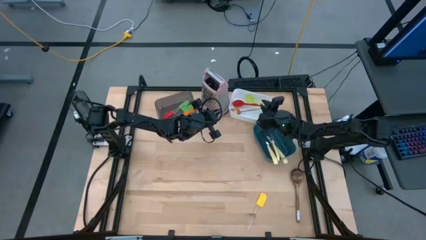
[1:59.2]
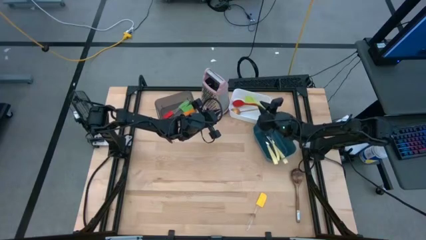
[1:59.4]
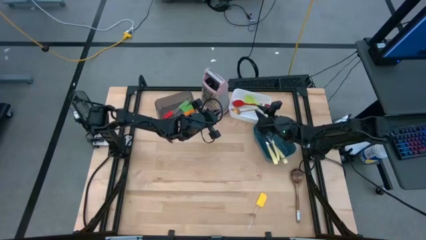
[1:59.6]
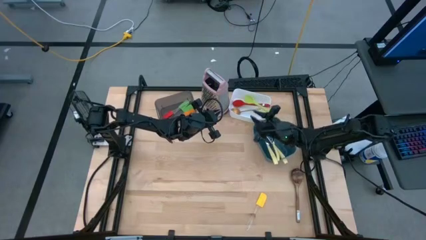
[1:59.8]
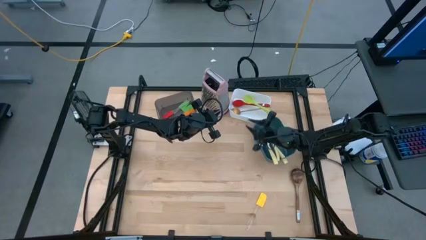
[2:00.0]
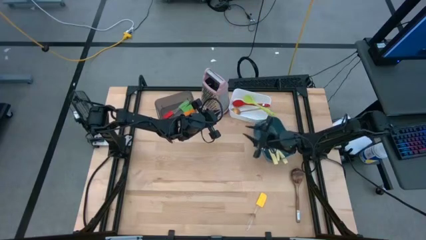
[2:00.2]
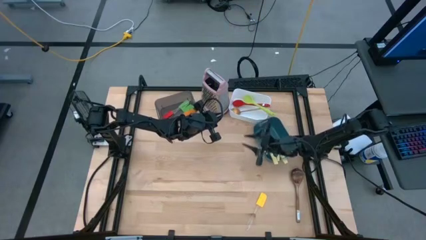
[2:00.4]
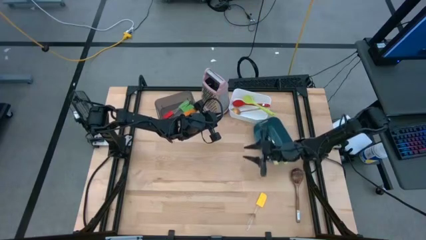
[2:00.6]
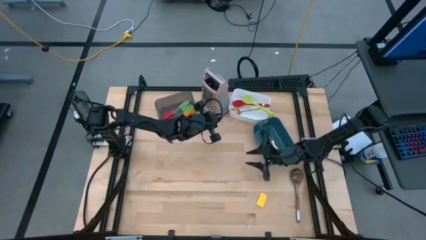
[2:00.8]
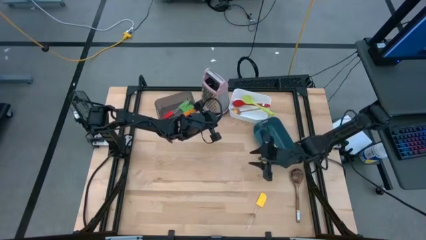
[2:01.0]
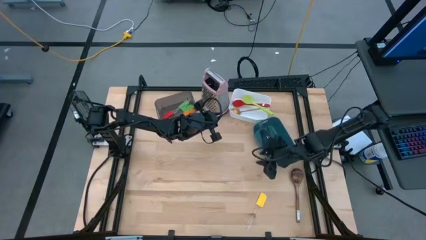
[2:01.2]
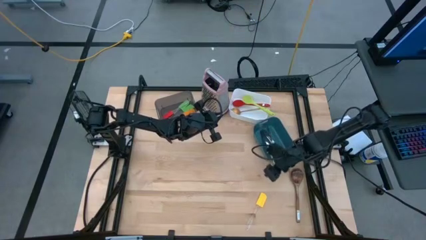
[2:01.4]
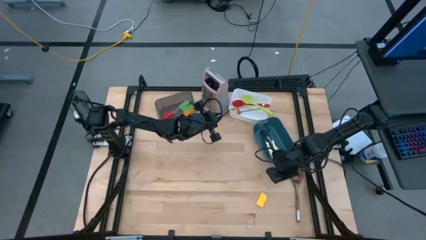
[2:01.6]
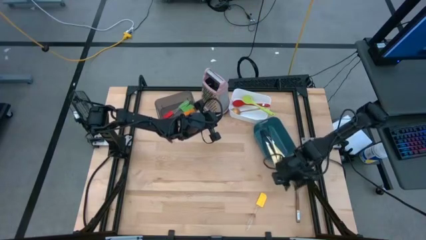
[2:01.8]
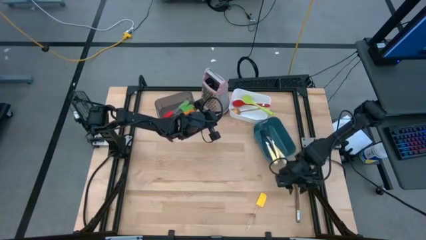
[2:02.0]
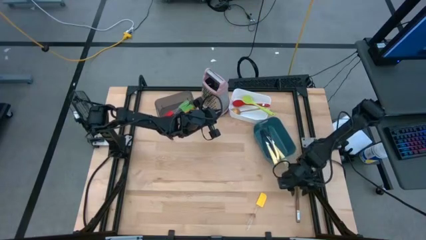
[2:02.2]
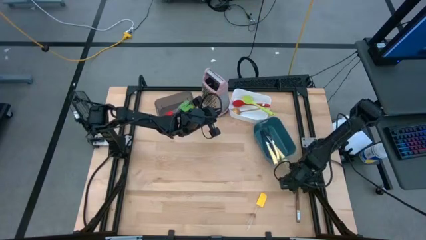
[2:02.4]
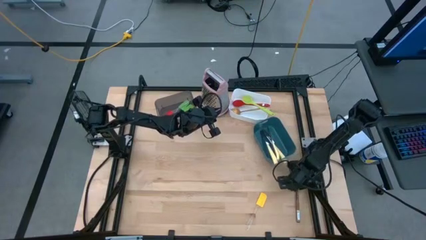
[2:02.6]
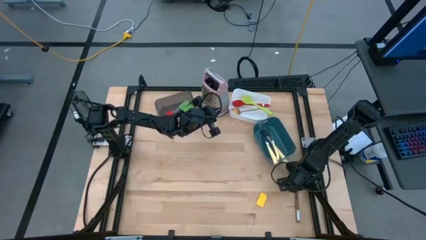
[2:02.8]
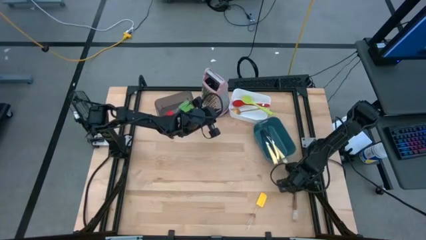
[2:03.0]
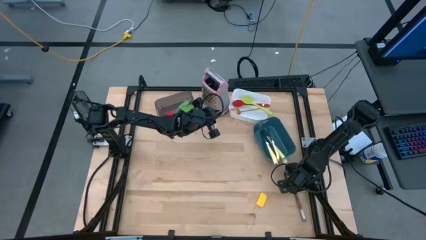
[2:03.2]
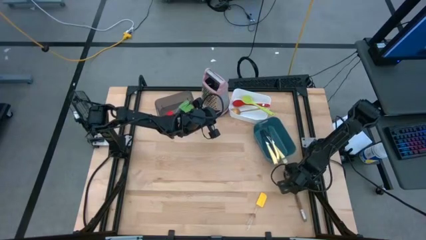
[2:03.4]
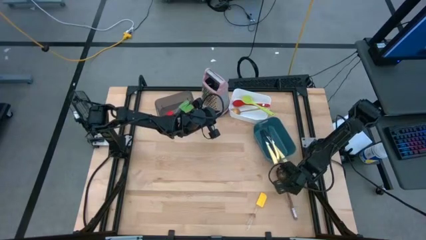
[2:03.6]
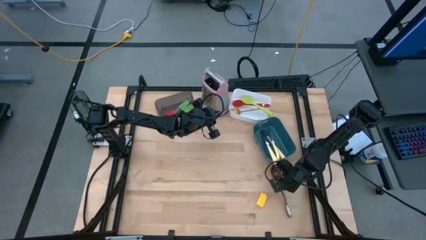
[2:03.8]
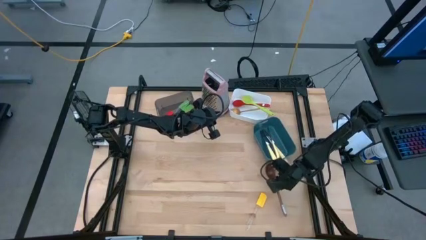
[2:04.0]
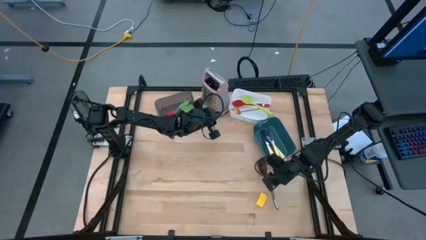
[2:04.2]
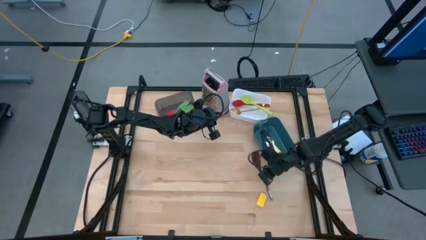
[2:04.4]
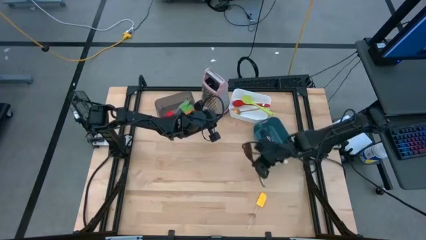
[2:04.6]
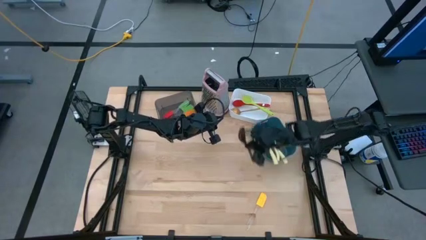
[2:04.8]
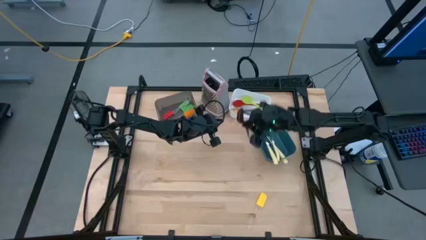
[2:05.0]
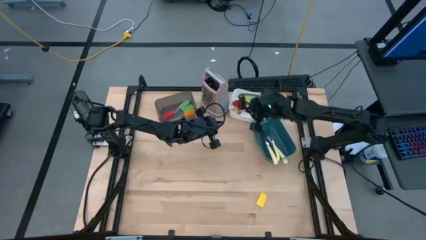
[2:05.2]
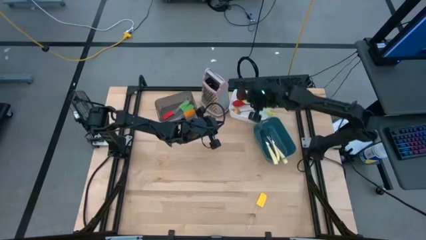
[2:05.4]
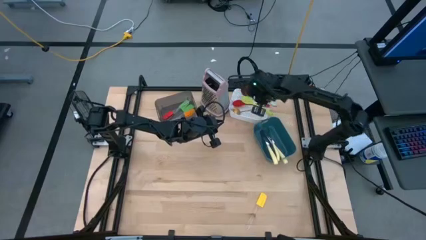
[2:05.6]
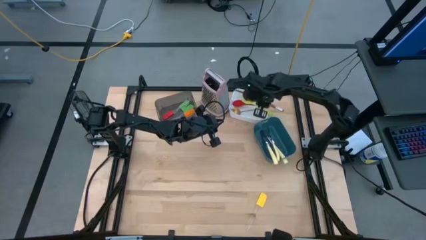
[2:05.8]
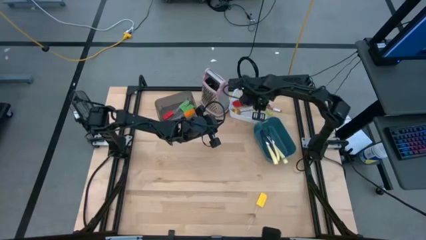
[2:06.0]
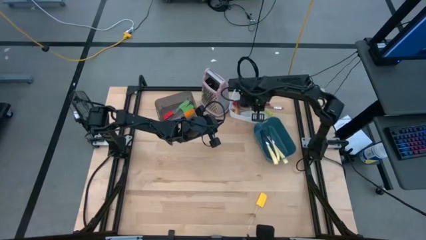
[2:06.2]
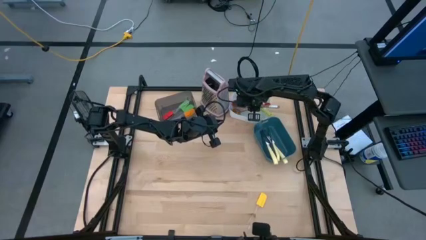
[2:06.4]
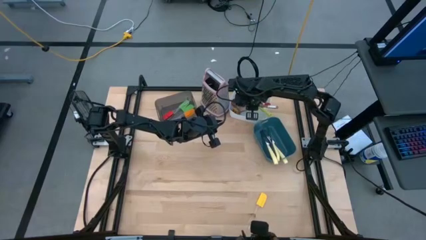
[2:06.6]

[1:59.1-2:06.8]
Task: Pick & Place Kitchen Items
Put the brown serving spoon into the white bin
